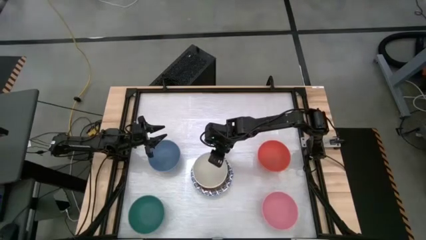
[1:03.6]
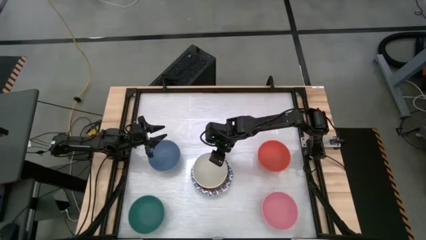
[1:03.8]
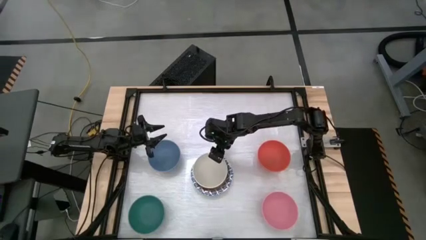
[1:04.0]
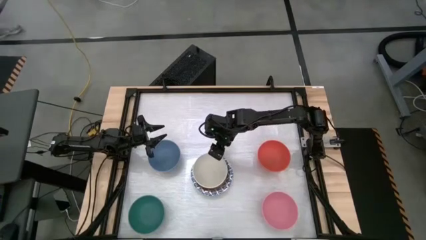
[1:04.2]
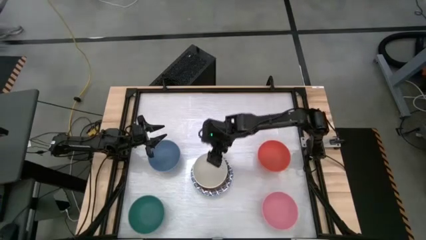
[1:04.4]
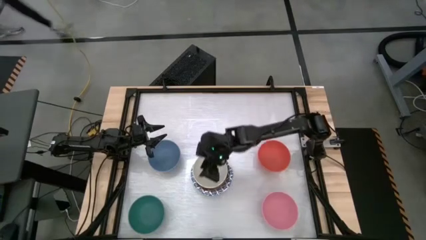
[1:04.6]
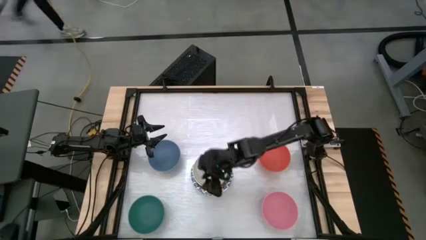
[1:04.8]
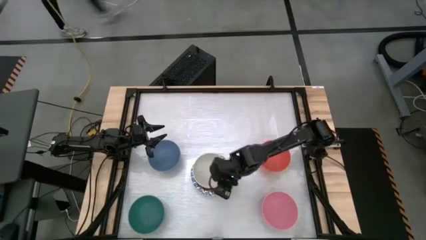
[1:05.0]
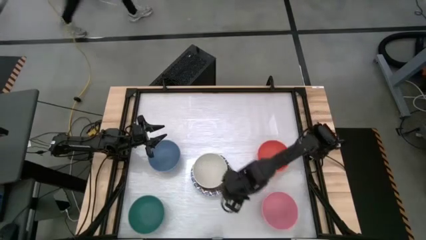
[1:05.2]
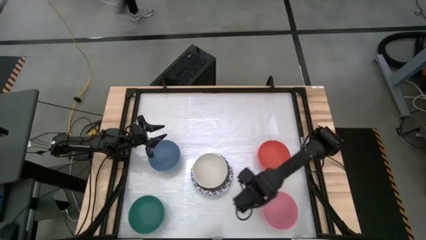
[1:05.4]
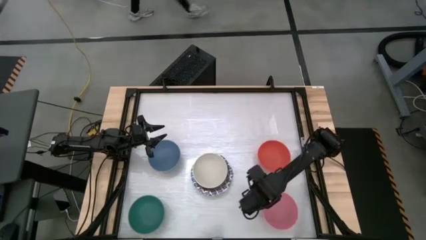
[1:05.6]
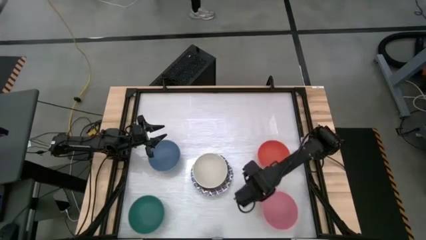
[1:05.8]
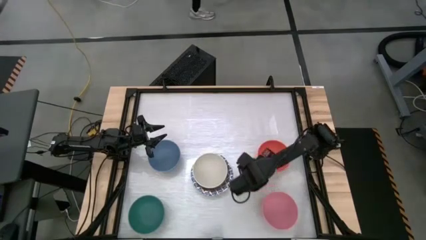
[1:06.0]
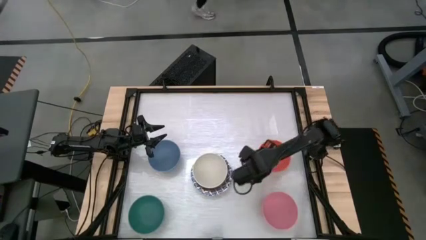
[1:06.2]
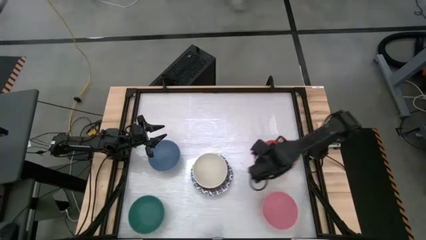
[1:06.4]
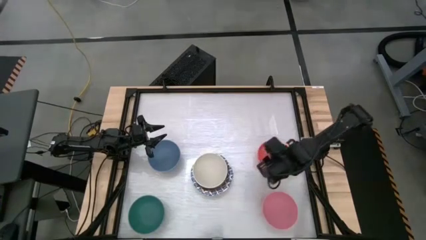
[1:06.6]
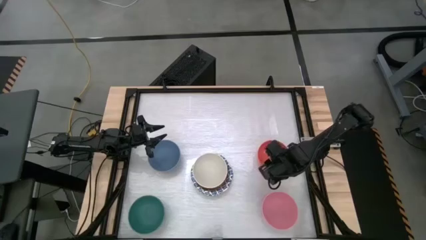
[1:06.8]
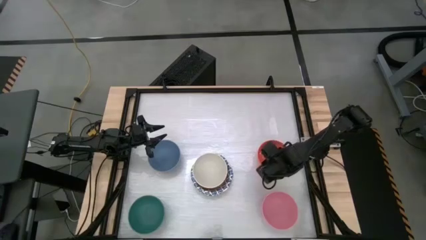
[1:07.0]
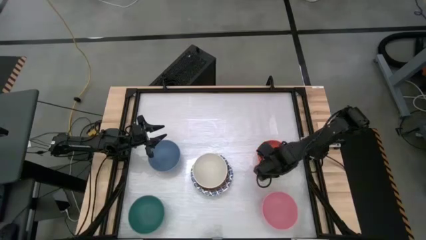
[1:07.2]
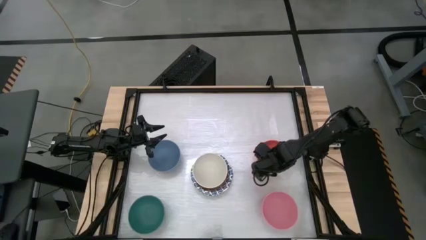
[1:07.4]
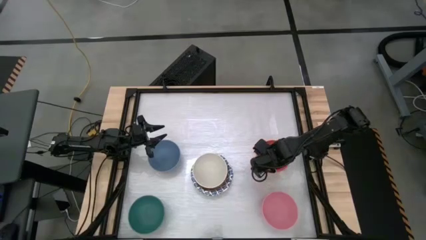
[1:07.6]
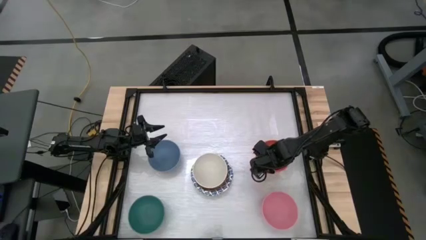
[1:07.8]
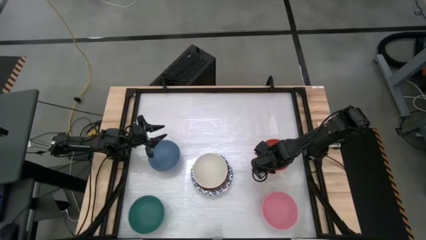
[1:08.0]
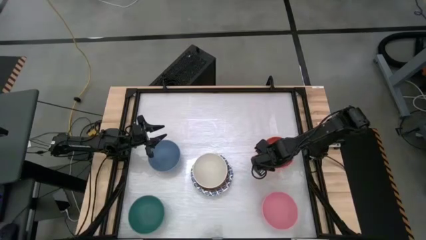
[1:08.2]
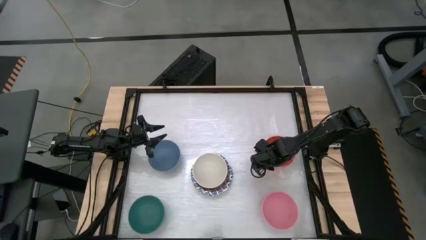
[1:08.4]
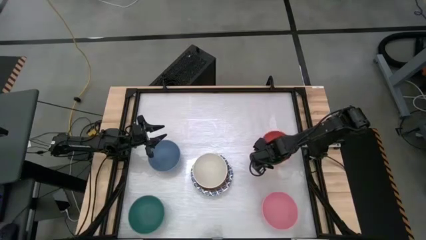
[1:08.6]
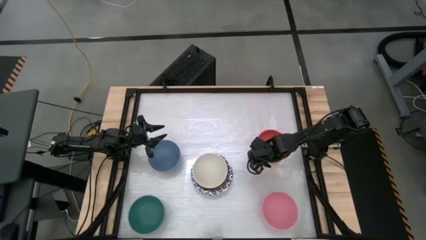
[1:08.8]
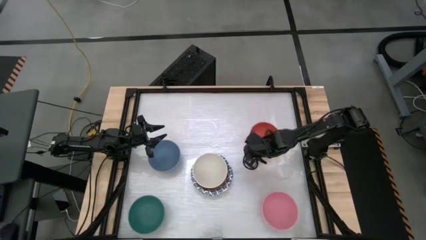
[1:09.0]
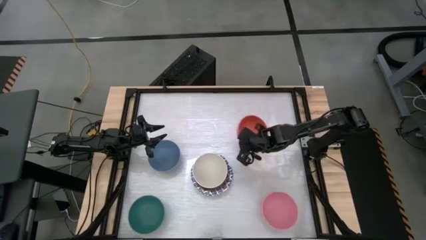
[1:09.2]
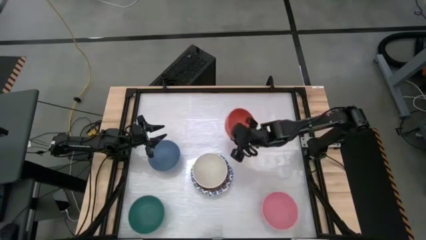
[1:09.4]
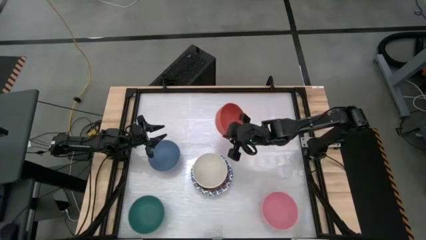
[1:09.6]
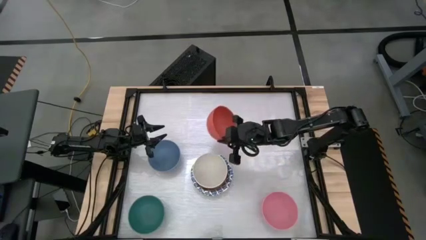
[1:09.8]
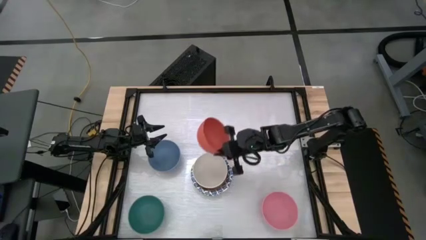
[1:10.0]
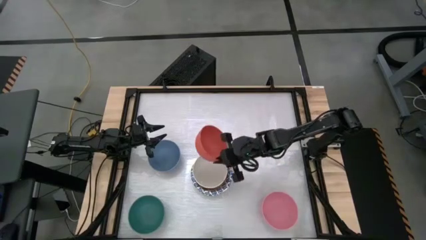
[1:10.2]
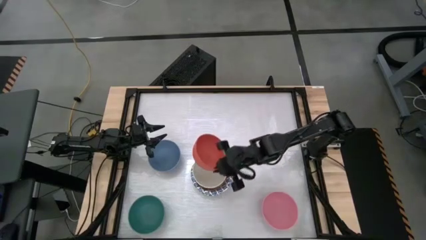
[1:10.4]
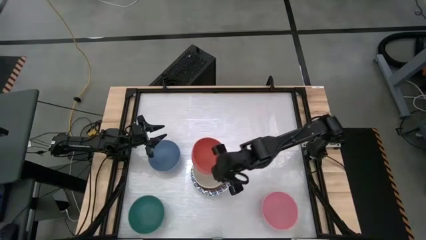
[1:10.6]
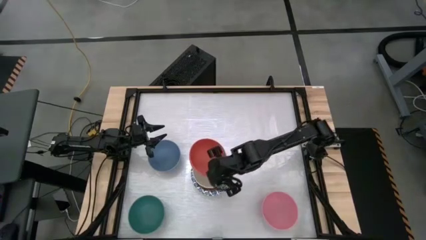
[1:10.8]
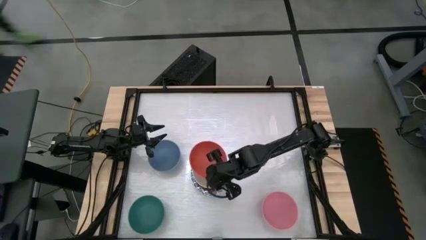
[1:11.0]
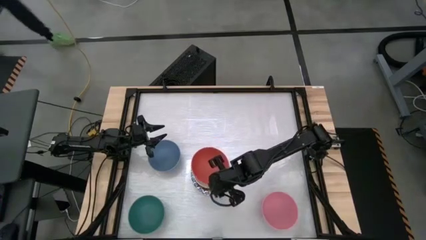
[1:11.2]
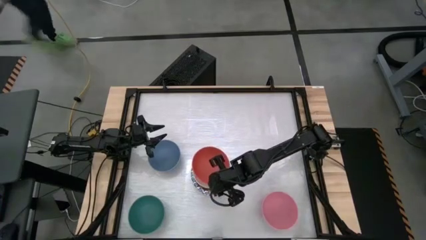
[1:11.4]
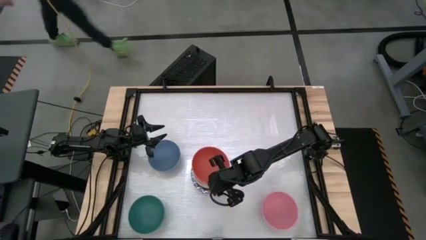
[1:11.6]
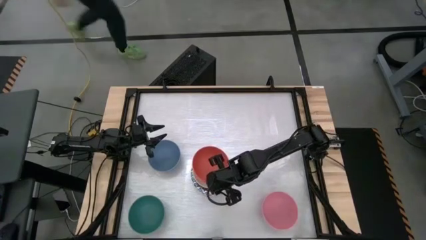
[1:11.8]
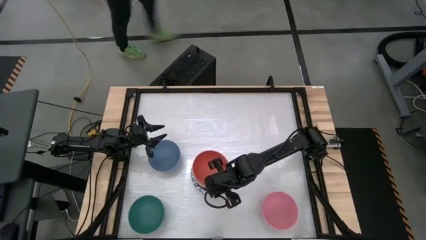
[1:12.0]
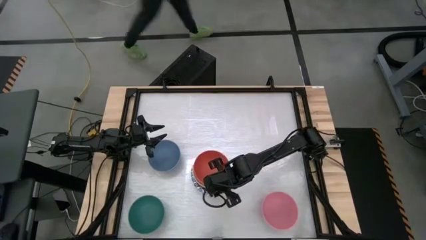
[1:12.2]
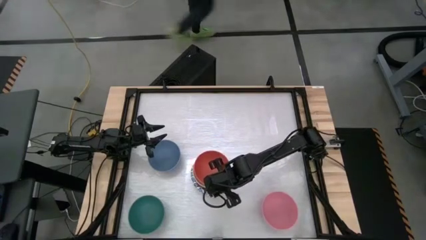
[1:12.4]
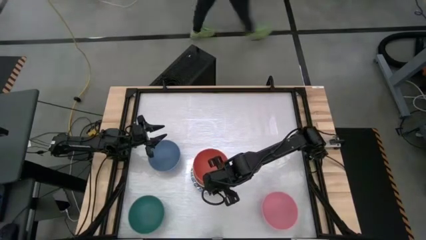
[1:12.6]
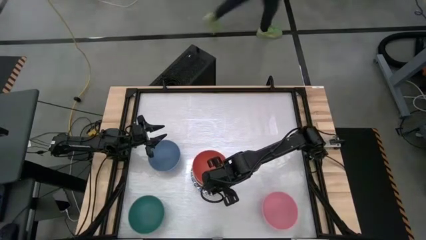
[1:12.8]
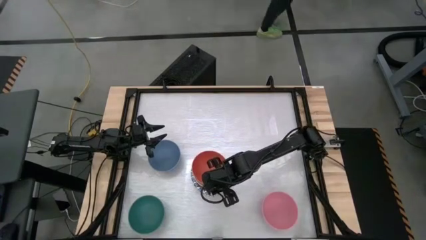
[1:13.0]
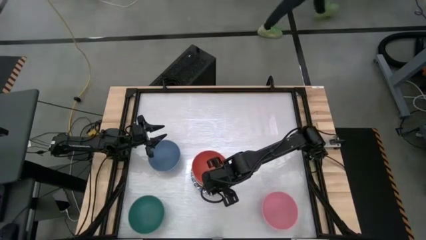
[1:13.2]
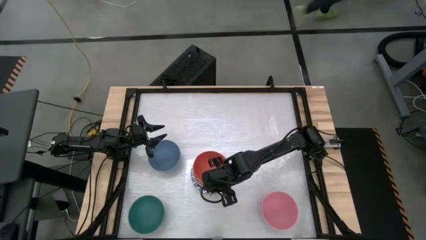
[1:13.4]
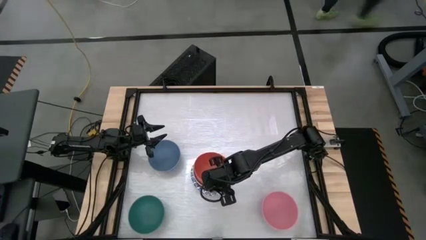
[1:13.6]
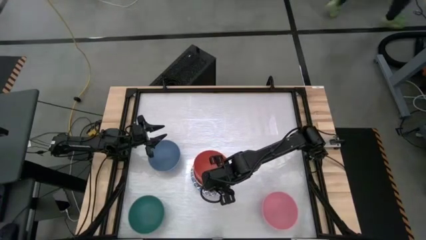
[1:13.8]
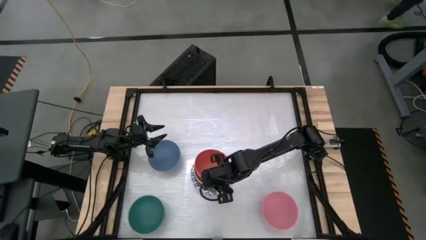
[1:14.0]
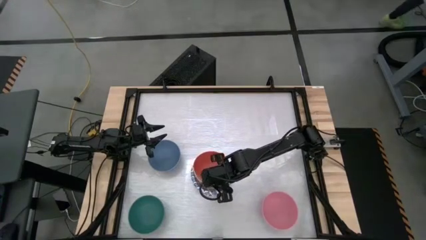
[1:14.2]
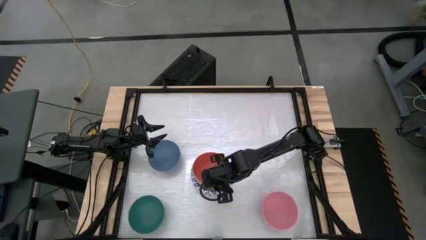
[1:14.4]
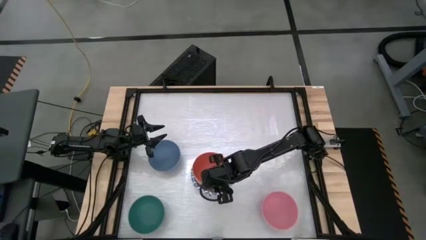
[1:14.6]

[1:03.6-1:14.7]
Task: Nest bowls inside each other by size order
Stack the red bowl into the white bowl

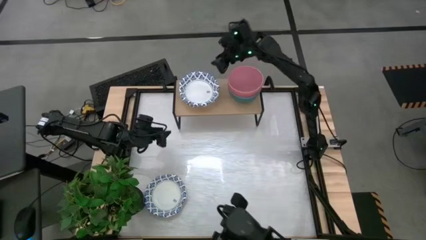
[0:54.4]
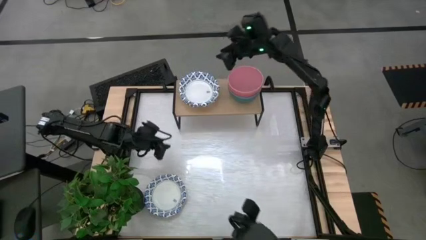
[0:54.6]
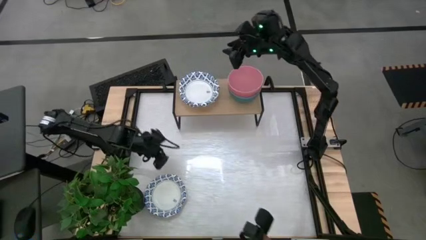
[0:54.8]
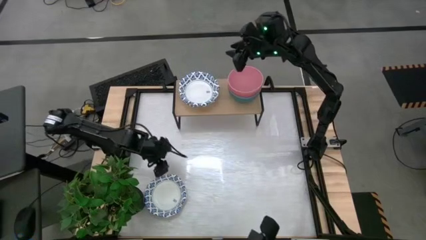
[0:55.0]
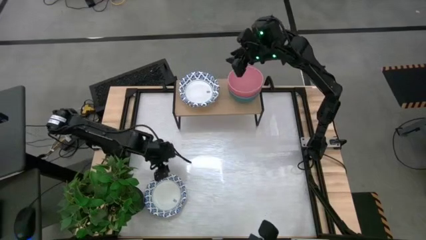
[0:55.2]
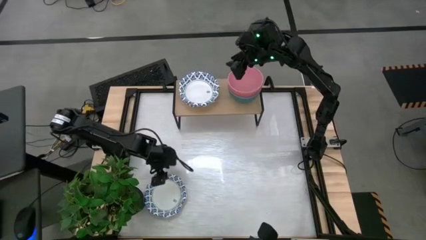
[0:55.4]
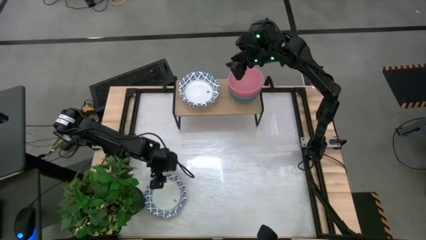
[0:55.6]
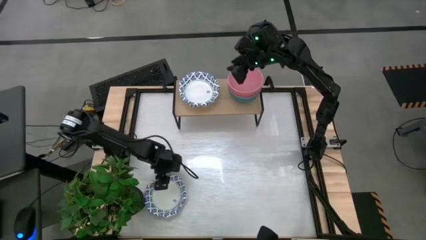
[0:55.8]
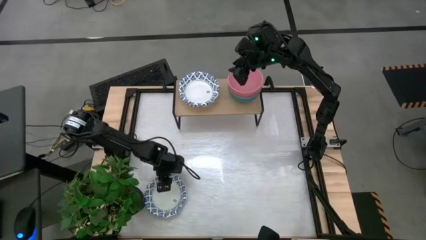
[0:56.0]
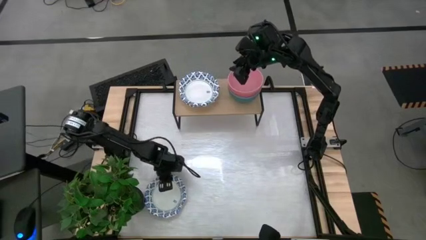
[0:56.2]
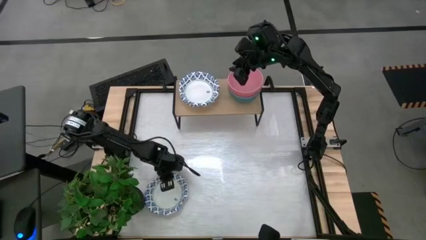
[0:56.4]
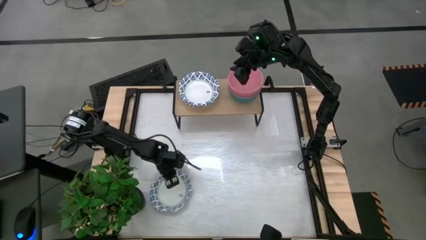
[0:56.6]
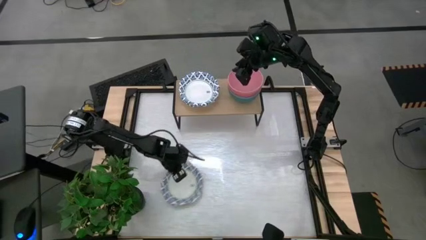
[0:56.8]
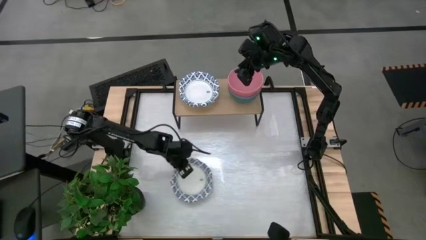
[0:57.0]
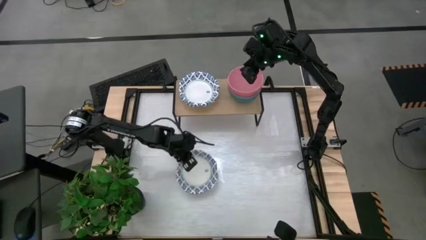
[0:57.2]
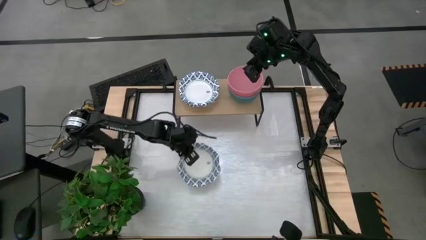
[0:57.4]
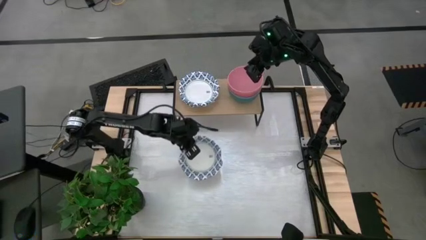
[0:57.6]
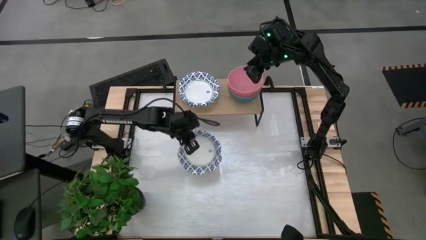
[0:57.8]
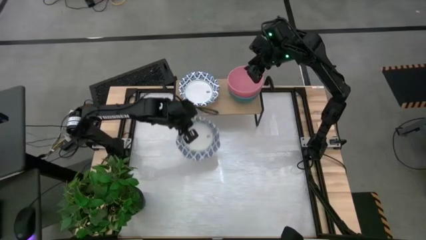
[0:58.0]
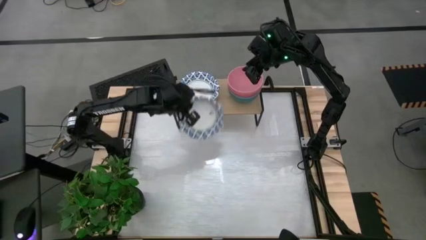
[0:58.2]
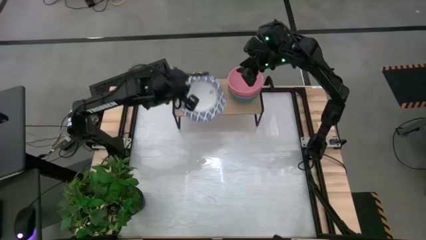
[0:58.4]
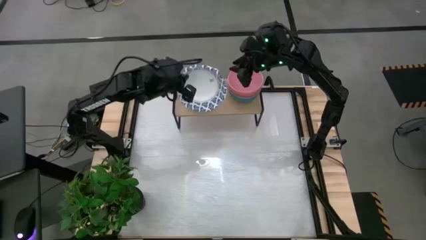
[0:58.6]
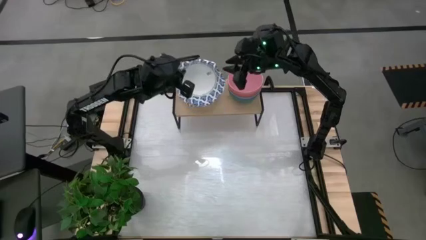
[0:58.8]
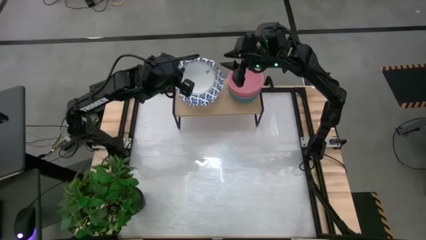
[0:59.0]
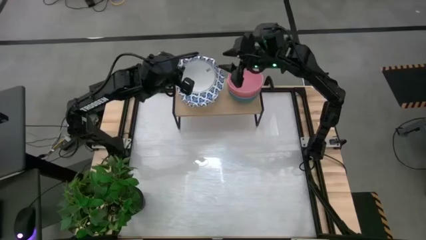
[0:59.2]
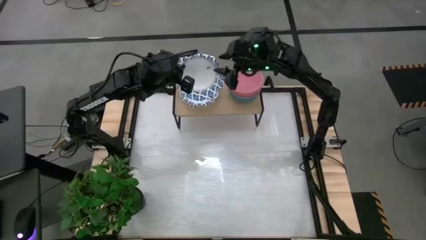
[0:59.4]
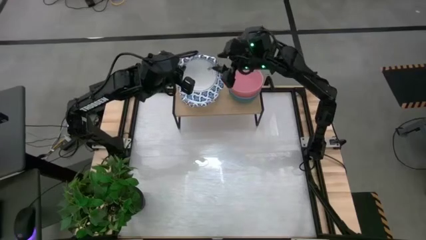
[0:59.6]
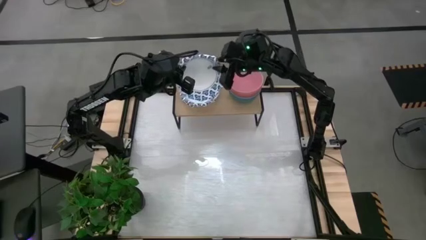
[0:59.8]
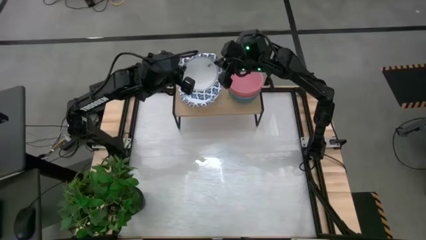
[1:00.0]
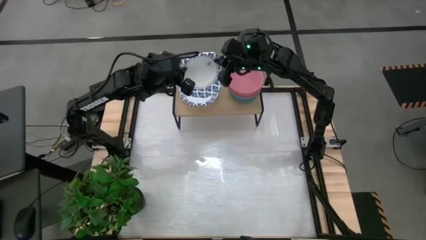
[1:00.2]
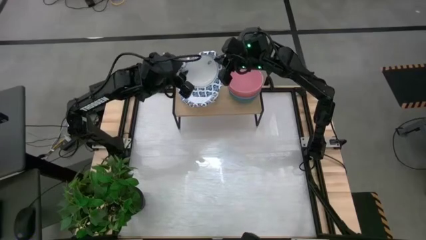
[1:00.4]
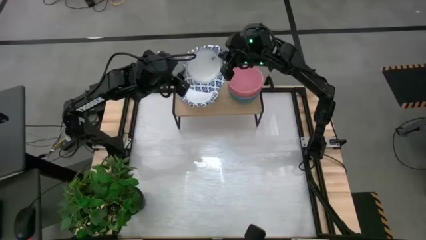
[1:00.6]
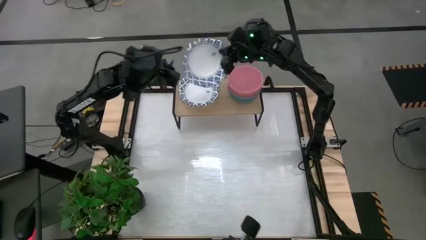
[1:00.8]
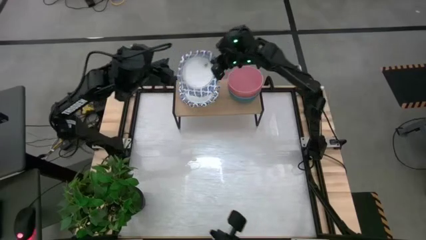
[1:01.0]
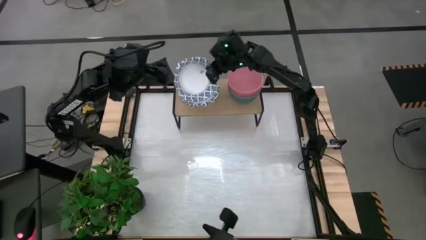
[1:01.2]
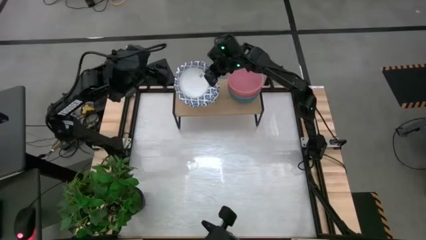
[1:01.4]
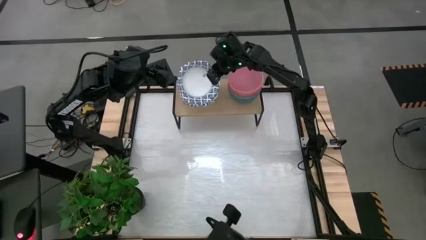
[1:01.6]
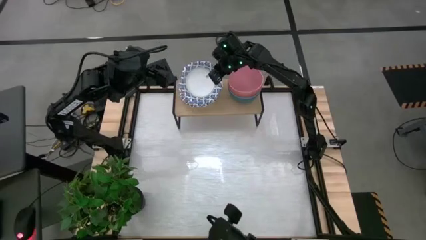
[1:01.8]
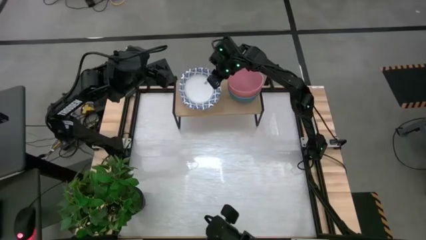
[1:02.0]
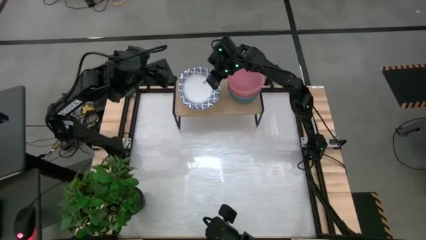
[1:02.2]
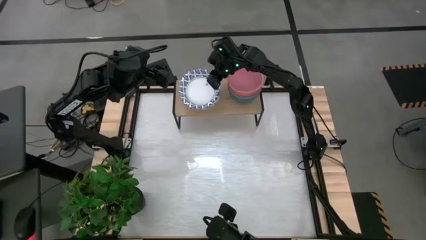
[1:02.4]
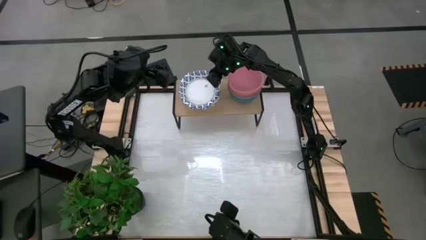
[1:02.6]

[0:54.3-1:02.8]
Task: Place and stack bowls onto a shelf
Stack the blue patterned bowl on top of the blue patterned bowls on the shelf
